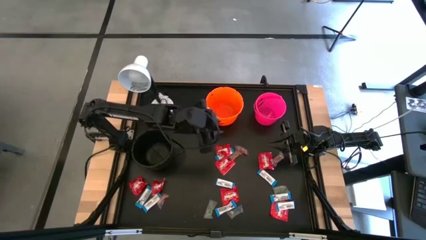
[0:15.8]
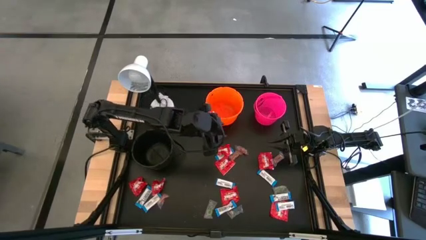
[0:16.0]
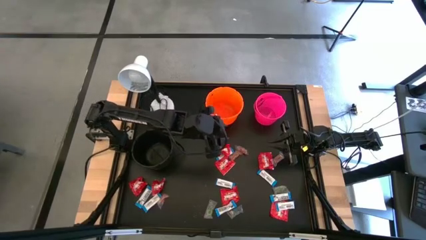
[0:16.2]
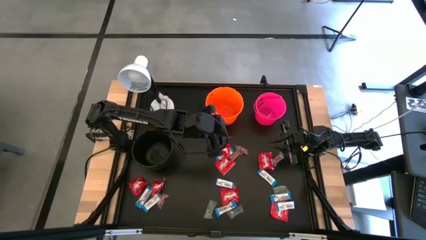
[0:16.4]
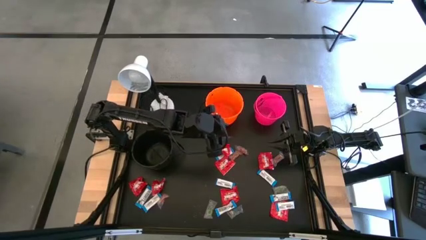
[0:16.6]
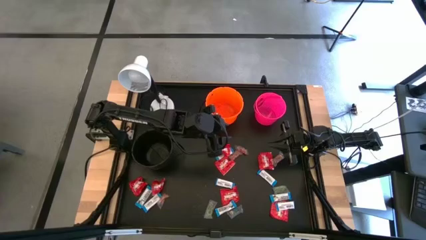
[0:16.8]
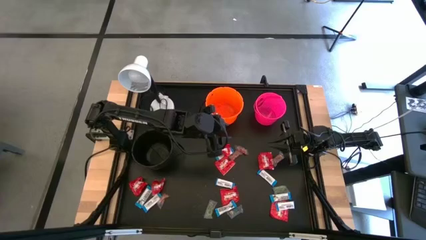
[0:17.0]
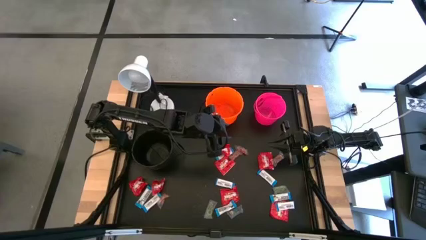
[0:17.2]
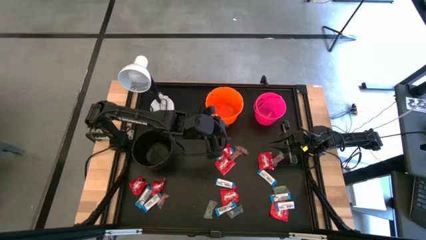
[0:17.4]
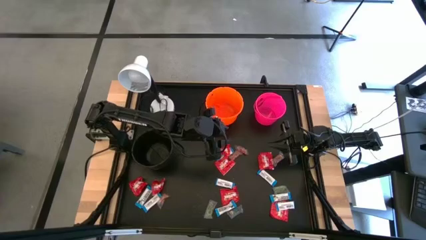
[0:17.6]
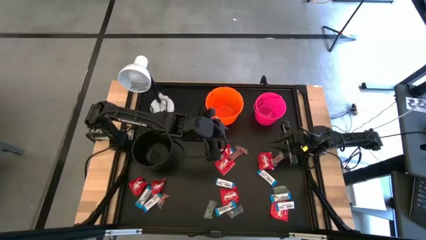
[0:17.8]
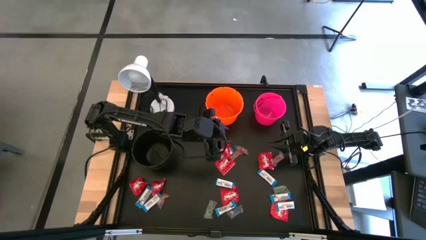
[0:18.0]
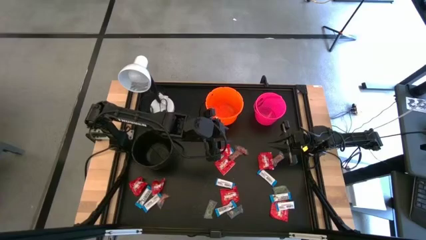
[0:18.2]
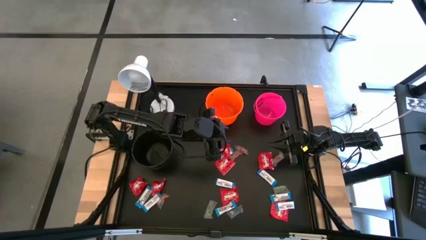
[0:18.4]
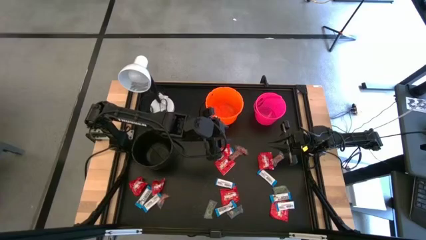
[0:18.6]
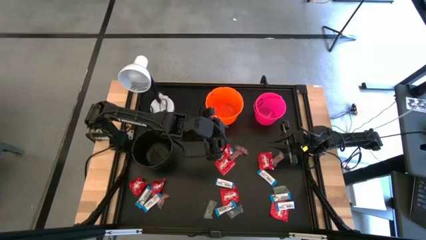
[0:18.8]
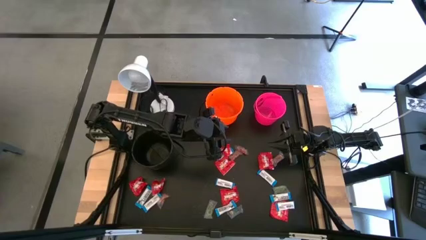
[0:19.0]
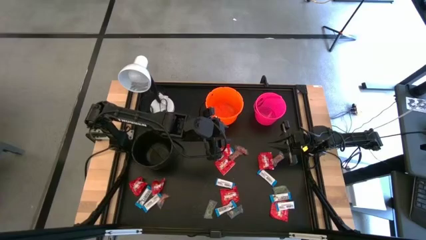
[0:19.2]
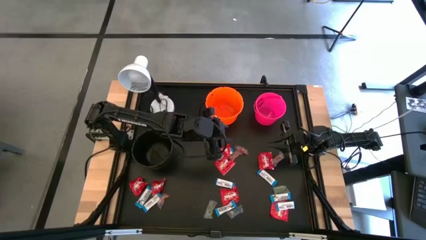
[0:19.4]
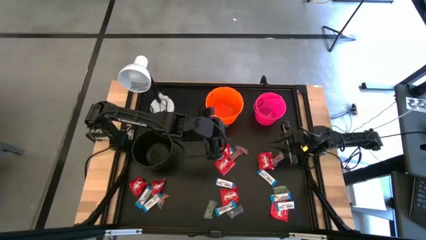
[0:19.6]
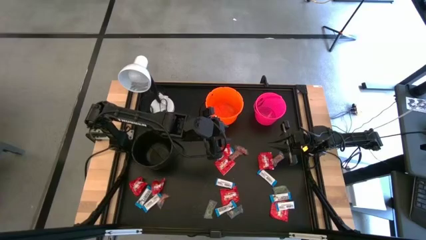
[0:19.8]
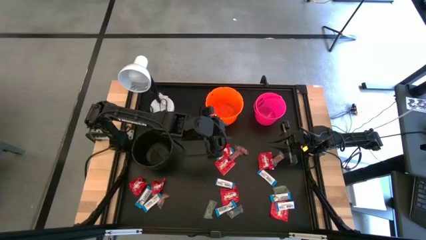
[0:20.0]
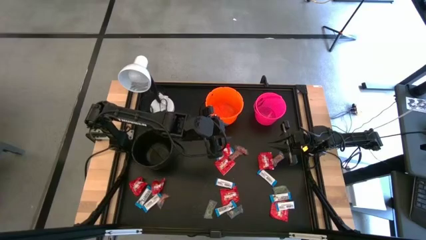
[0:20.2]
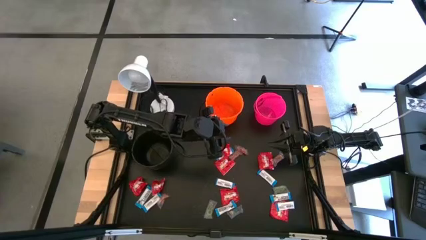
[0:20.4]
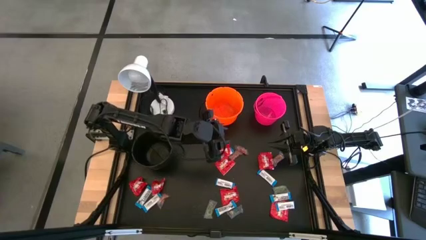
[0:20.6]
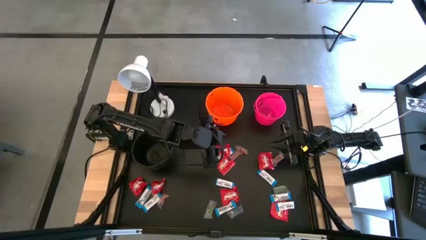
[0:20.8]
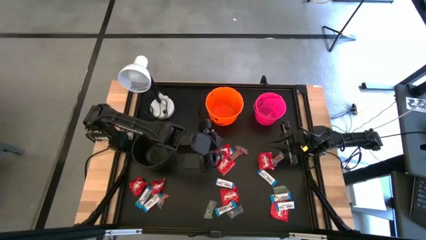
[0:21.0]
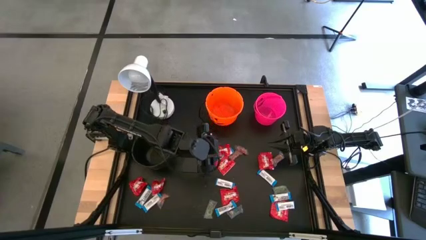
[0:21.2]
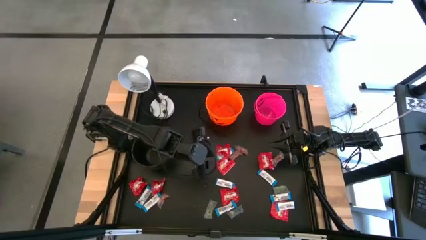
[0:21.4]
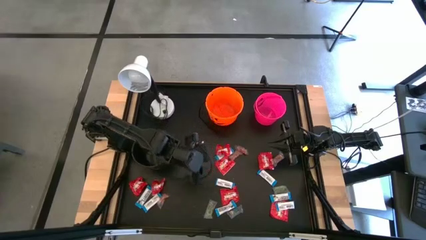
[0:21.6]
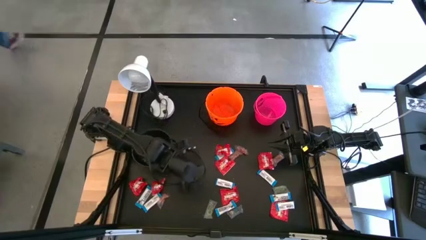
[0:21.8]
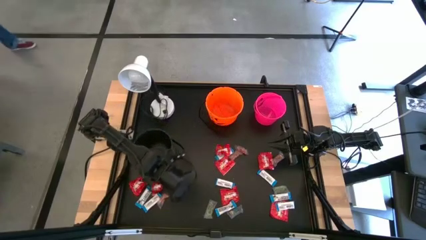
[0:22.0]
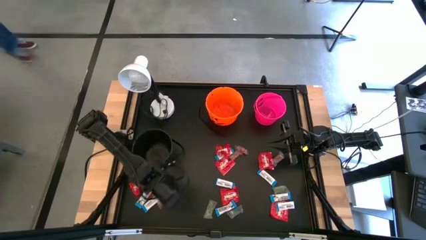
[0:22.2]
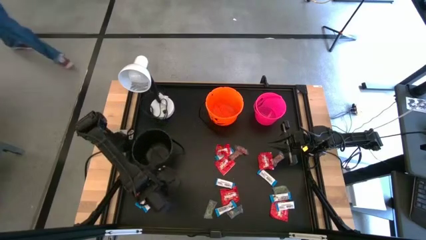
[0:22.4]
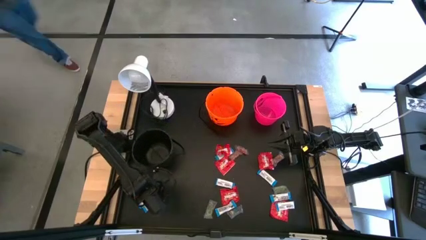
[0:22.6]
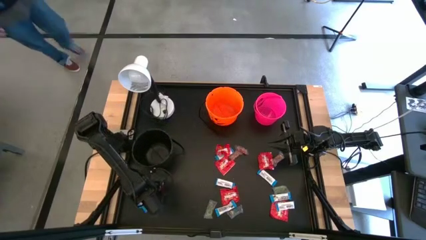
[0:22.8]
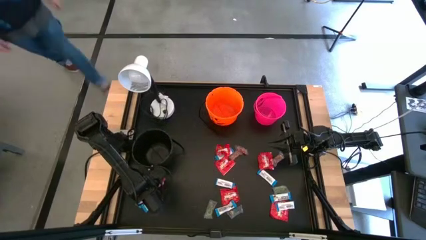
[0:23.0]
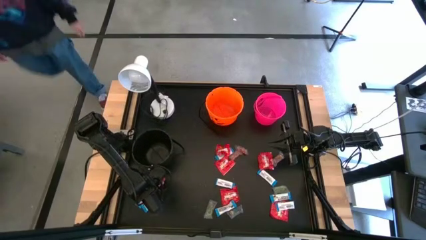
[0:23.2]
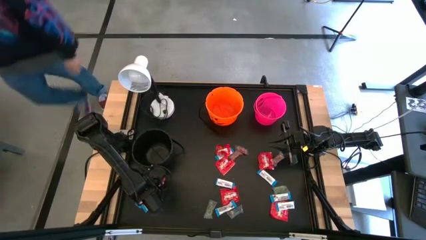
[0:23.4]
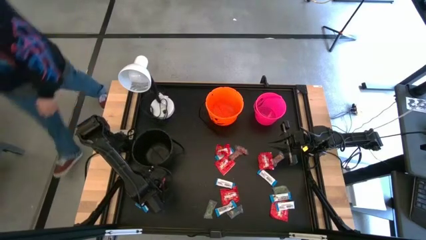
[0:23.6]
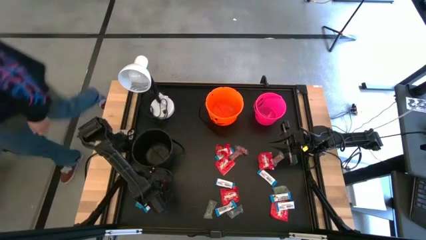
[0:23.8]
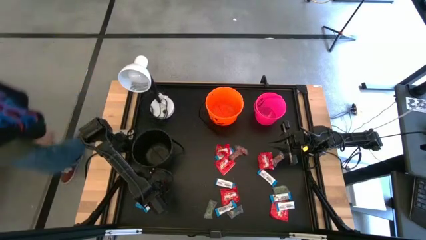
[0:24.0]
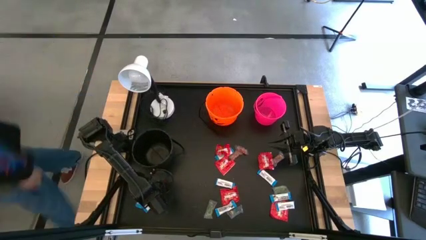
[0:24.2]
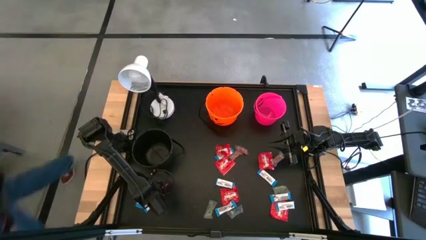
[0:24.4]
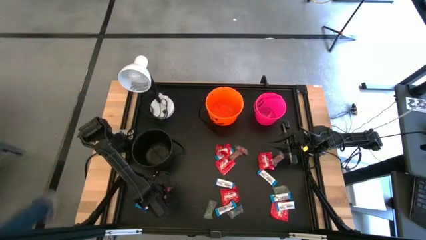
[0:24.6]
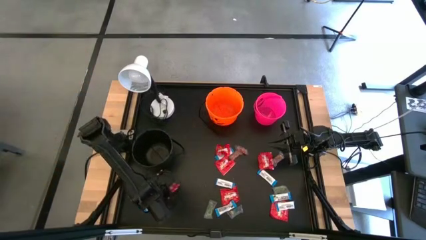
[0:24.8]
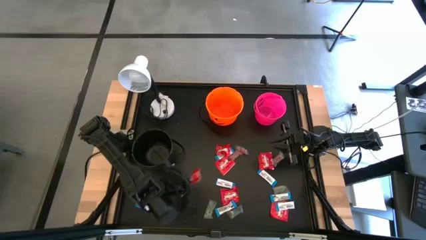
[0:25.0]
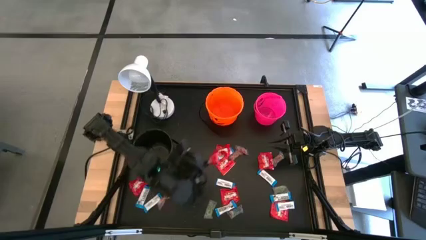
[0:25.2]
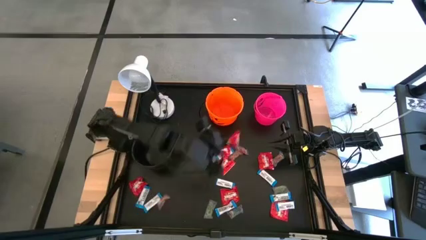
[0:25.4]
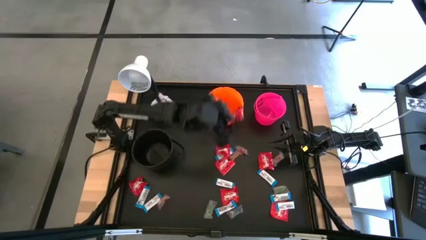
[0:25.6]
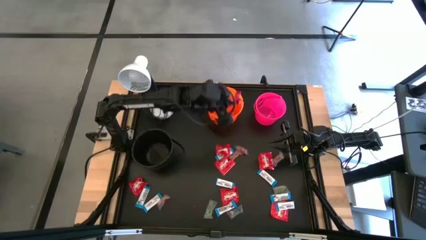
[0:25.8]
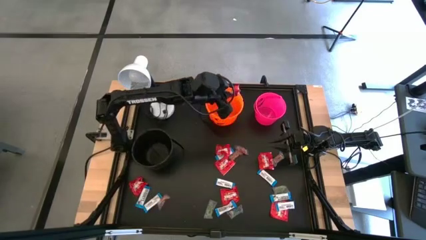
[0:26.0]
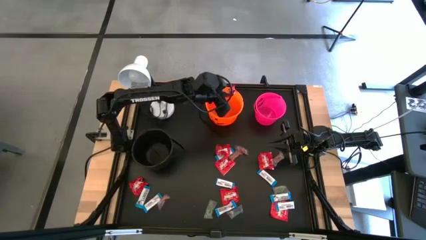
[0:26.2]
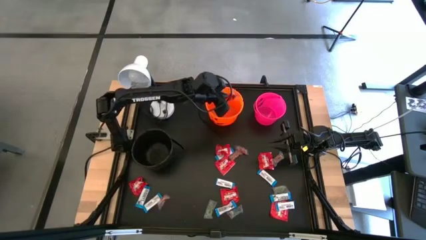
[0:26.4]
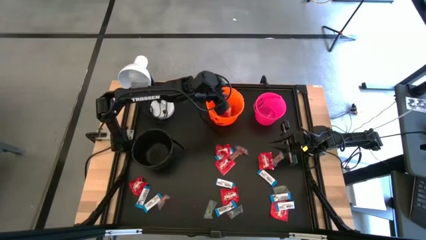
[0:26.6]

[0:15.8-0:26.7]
Task: Sort candy
Put the red candy into the orange bucket

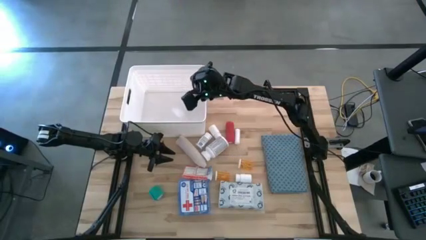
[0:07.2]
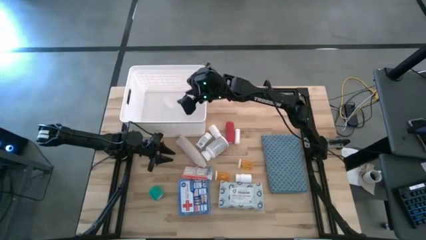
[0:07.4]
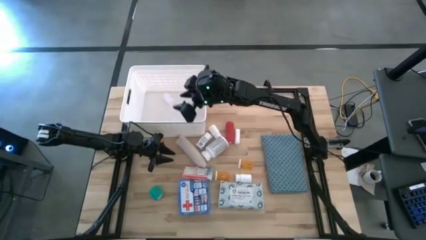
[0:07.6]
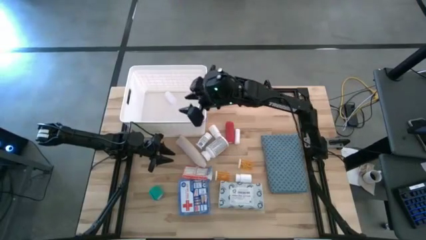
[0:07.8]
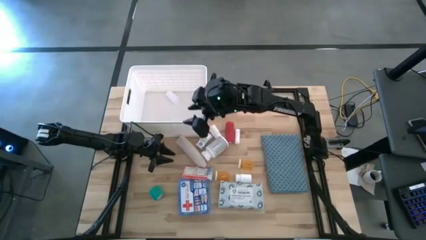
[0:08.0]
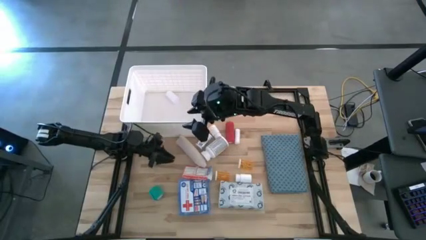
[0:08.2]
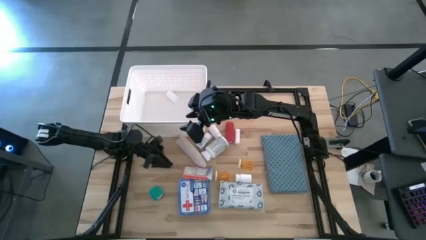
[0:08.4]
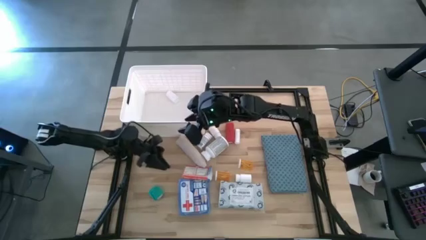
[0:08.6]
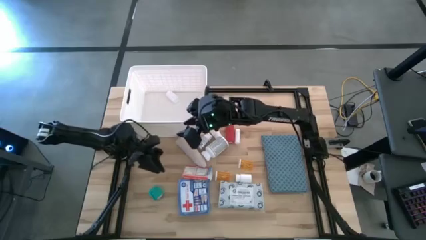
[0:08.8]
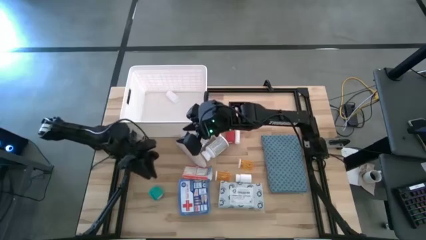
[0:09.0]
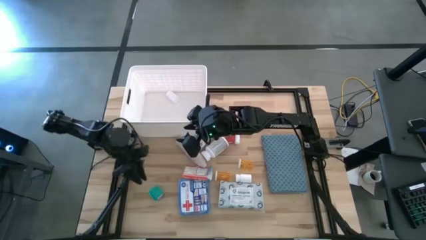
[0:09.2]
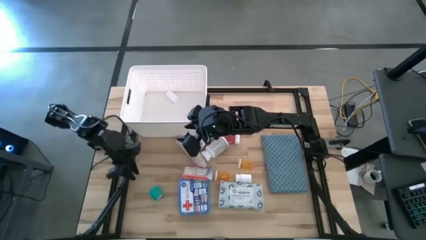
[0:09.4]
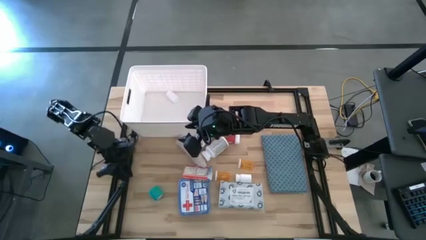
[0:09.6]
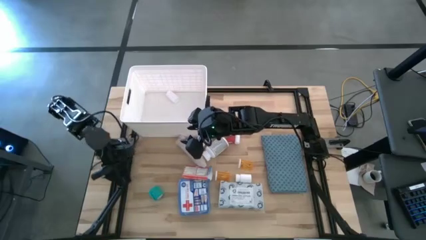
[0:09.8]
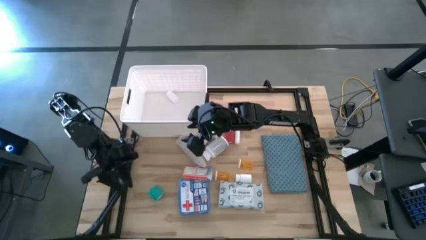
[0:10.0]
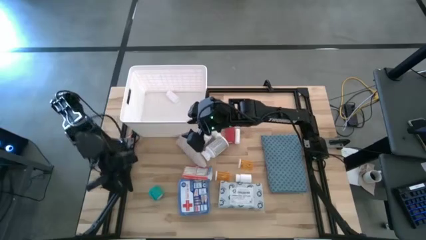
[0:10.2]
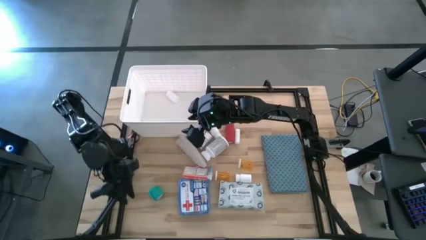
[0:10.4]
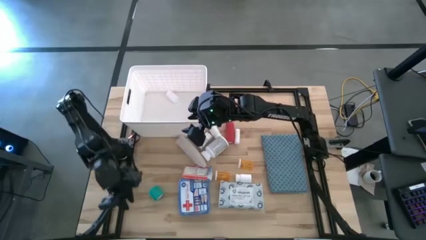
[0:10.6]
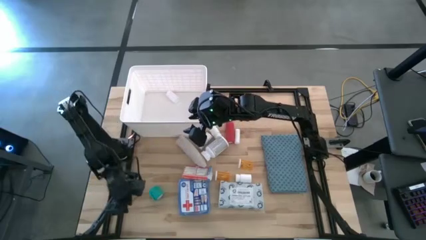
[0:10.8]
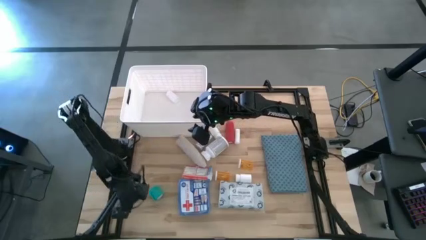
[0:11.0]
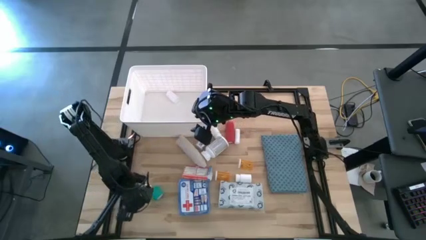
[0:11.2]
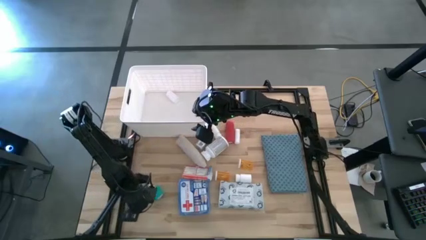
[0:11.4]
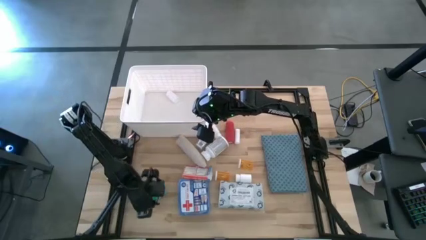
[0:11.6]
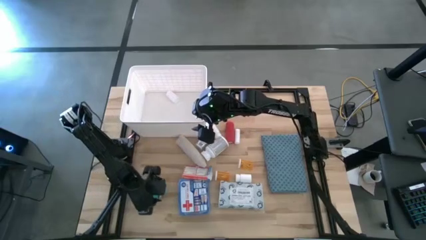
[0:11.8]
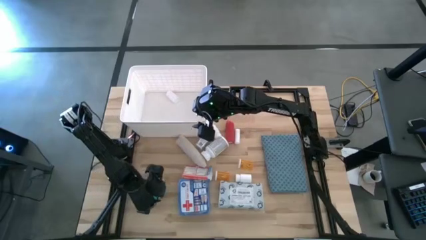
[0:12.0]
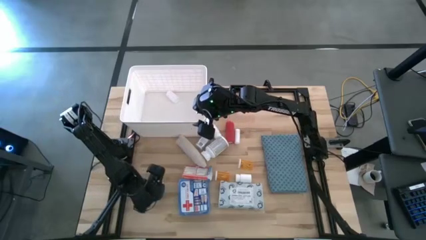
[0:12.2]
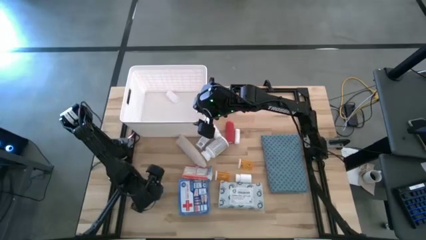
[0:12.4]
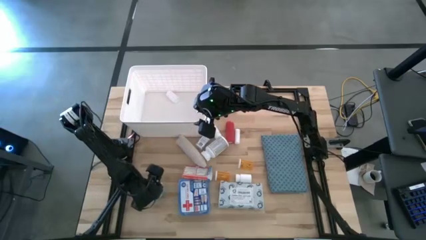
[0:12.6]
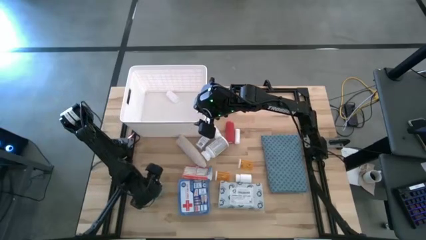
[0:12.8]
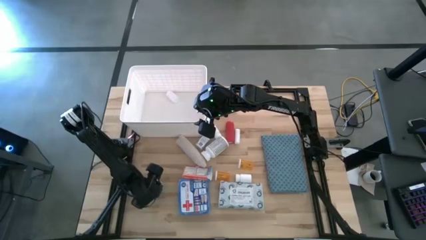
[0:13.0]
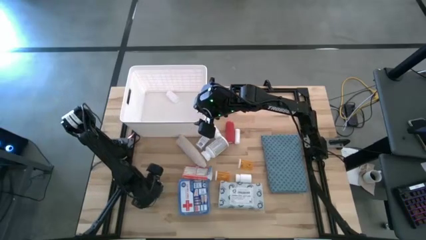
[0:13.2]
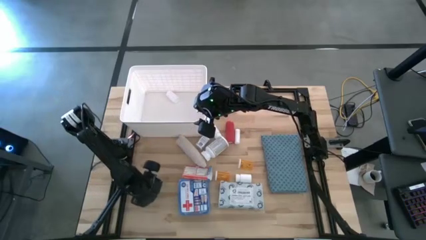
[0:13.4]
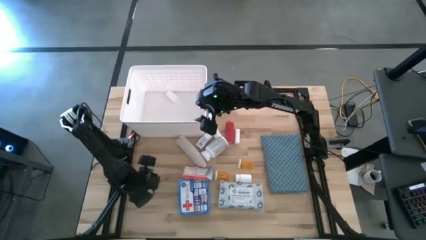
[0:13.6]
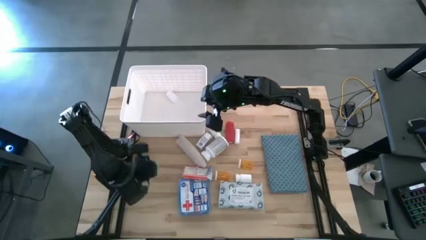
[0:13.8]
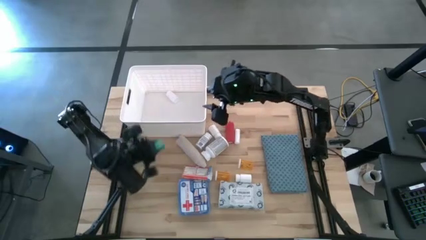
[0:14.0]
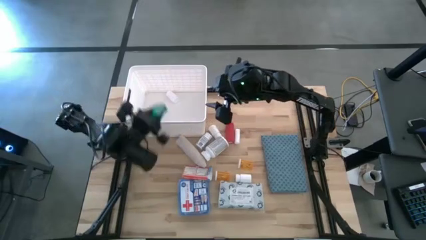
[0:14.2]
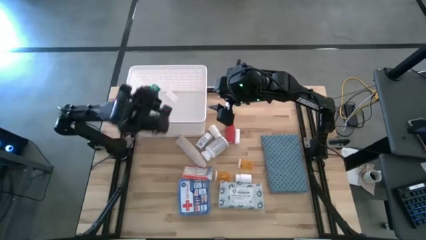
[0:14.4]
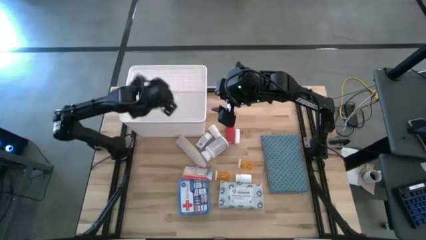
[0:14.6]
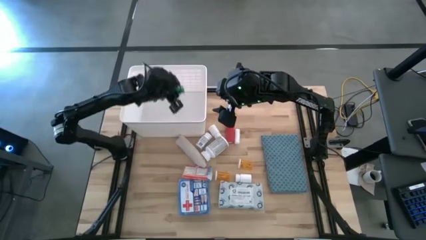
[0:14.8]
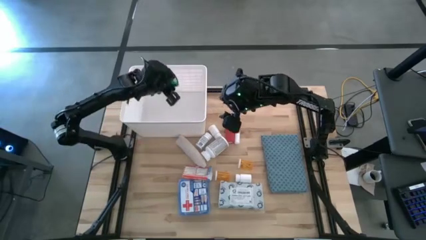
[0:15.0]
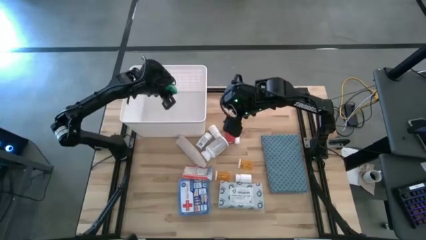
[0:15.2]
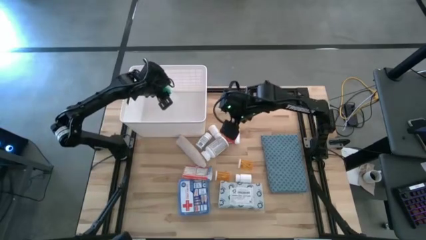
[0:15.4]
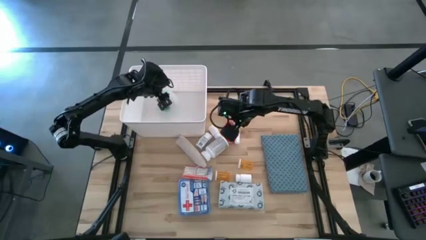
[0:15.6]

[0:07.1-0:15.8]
Task: Pick & place medical supplies in basket/bin
Put the green bandage into the white bin
